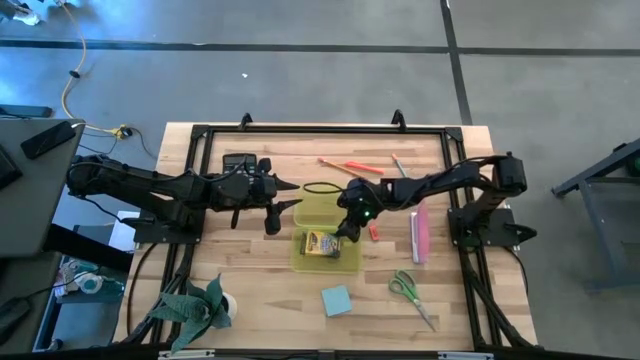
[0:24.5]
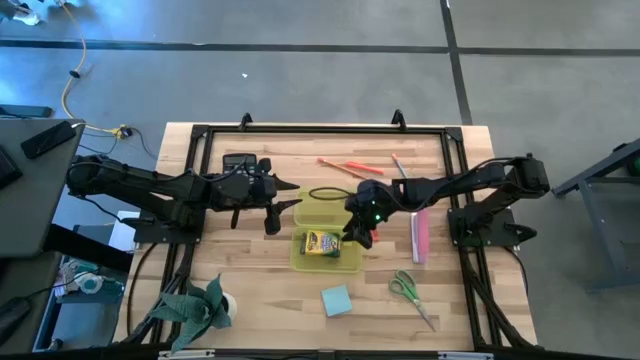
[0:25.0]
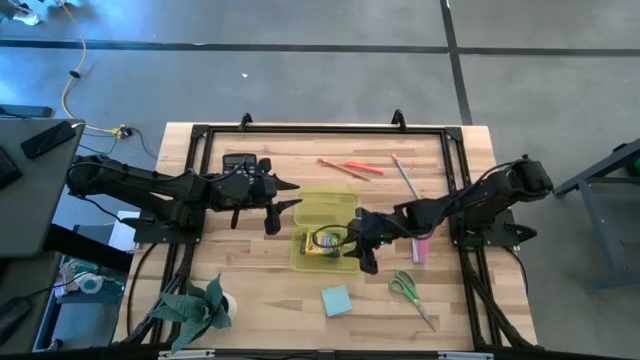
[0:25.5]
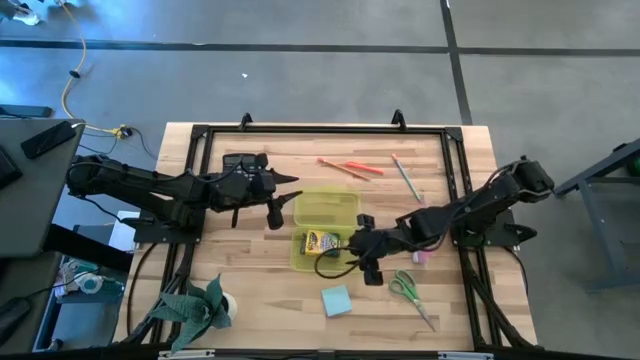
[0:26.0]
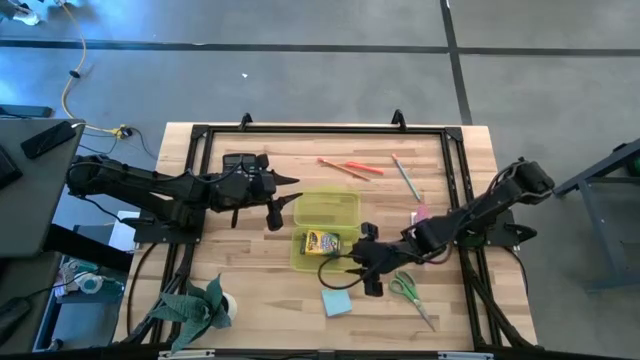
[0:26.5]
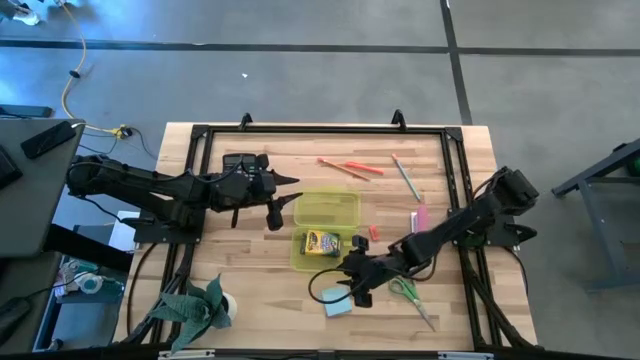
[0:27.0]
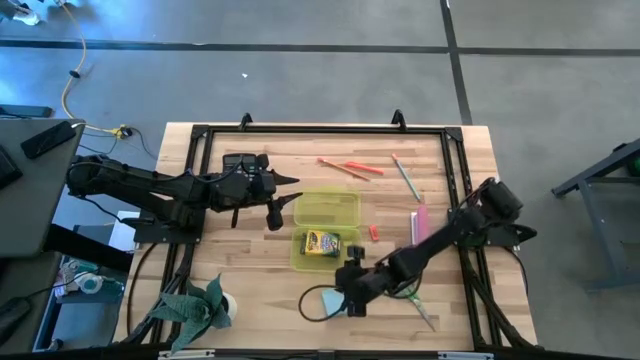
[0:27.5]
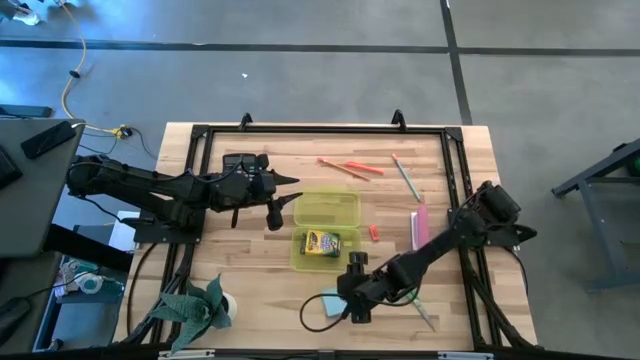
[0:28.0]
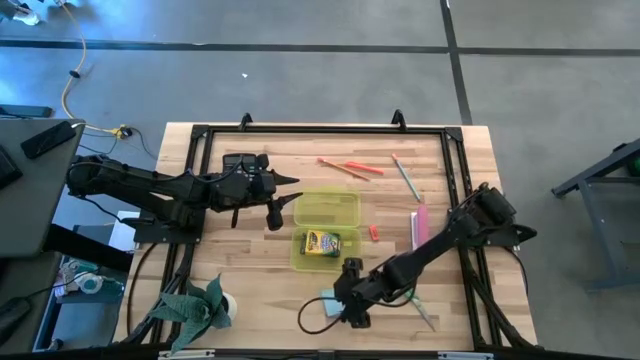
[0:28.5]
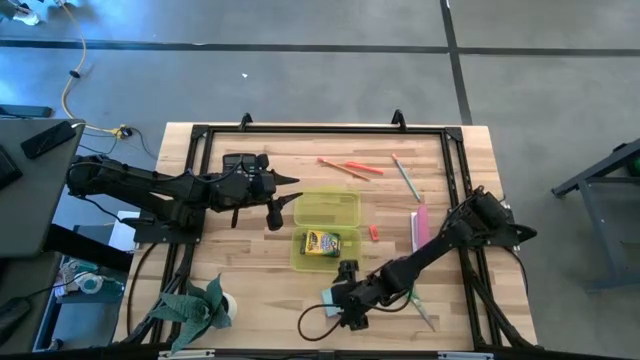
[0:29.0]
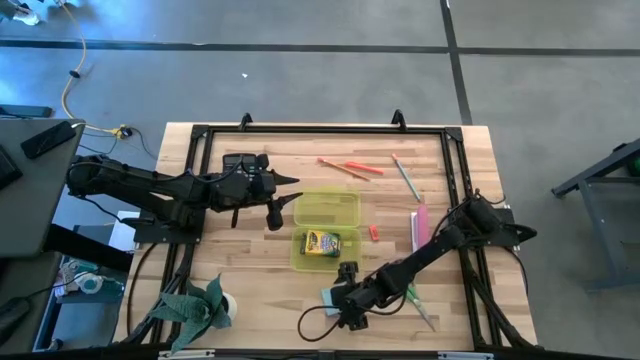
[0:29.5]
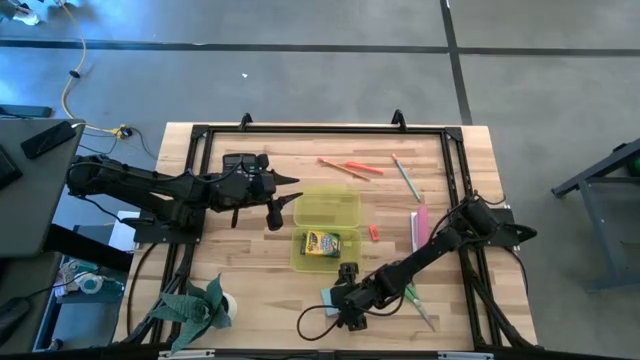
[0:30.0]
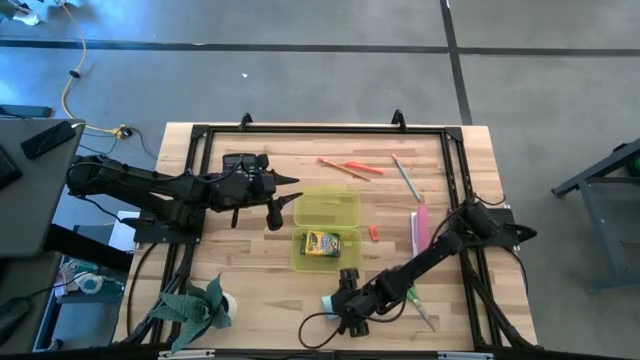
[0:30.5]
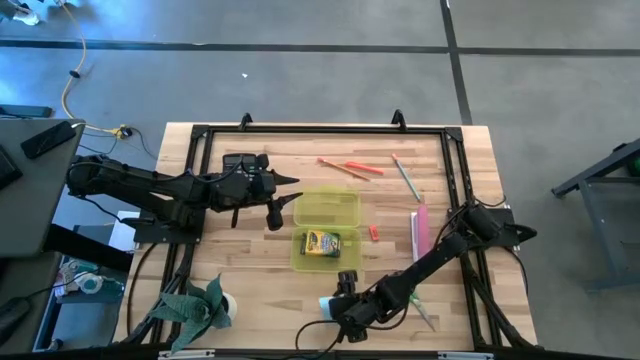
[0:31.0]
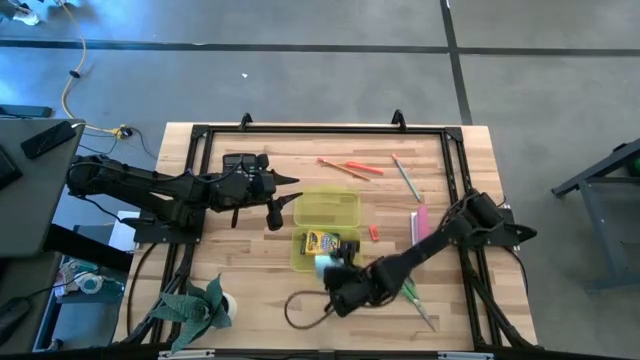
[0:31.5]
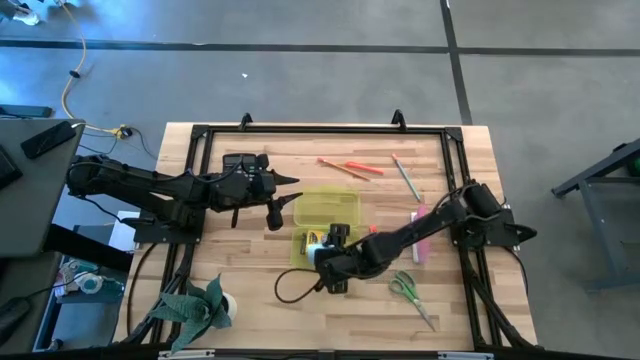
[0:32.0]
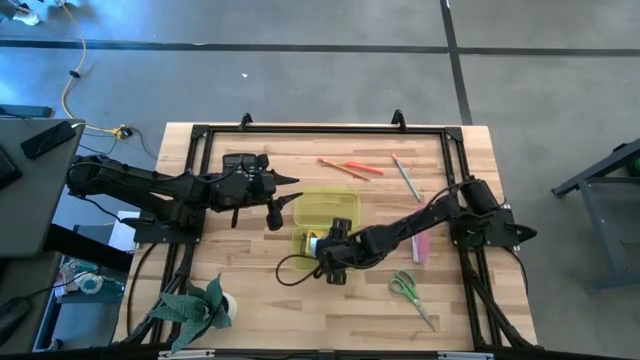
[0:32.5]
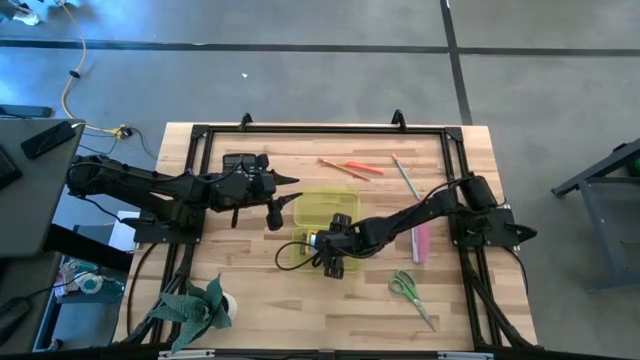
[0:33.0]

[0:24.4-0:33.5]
Task: Pack school essentials
Put the blue sticky notes into the yellow supply box

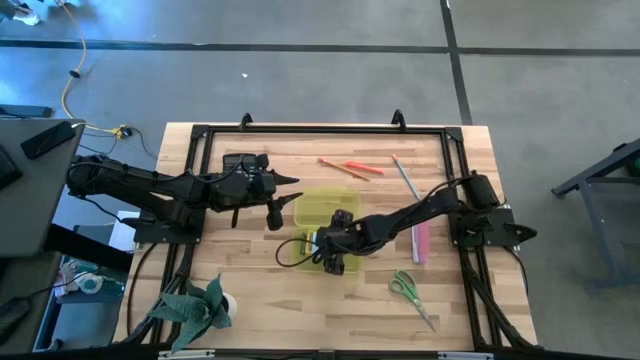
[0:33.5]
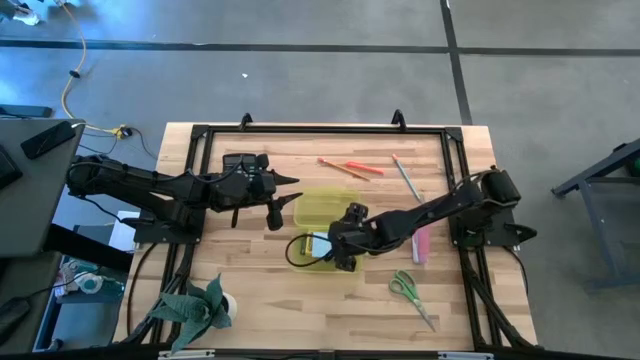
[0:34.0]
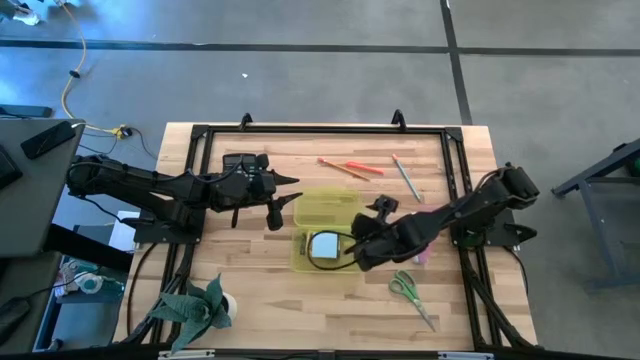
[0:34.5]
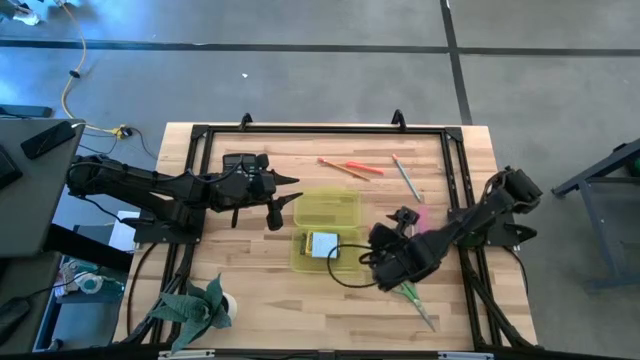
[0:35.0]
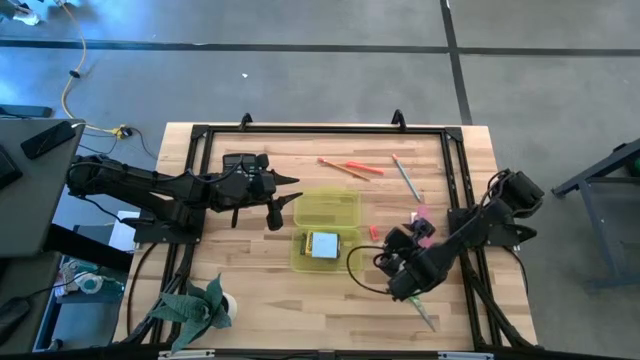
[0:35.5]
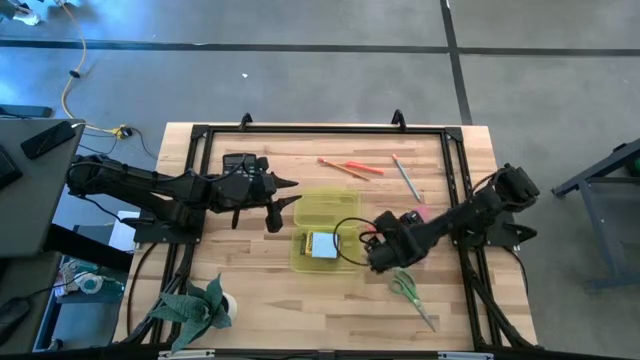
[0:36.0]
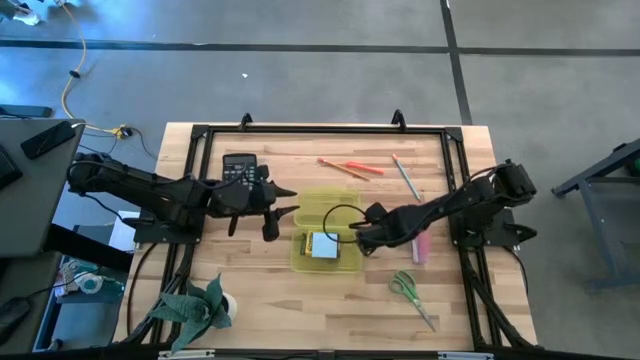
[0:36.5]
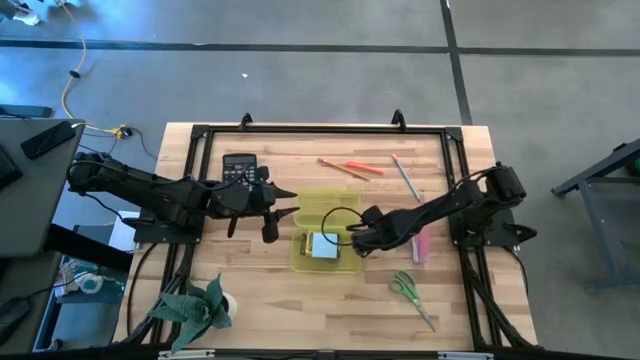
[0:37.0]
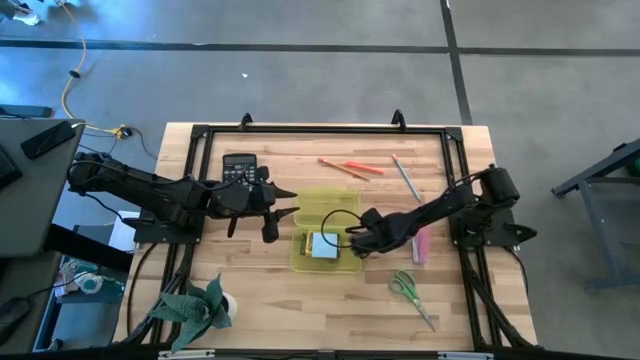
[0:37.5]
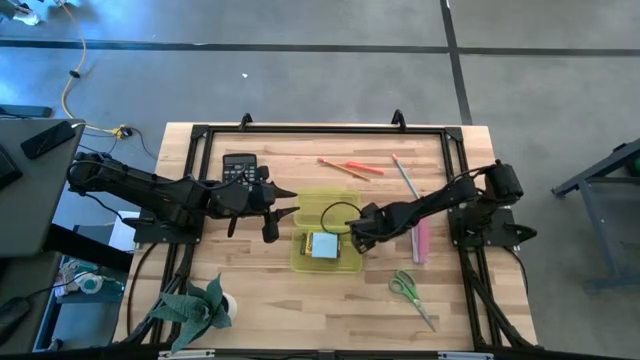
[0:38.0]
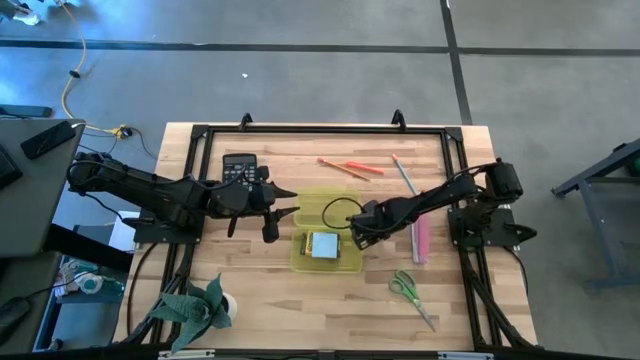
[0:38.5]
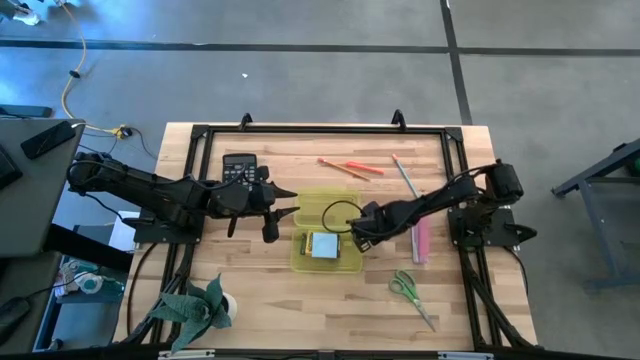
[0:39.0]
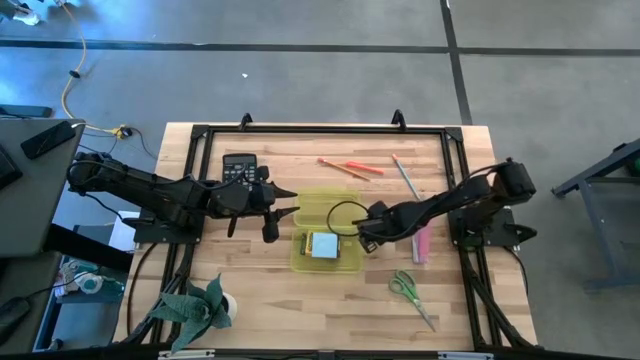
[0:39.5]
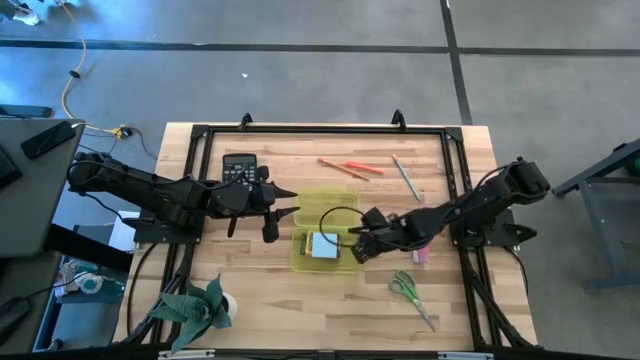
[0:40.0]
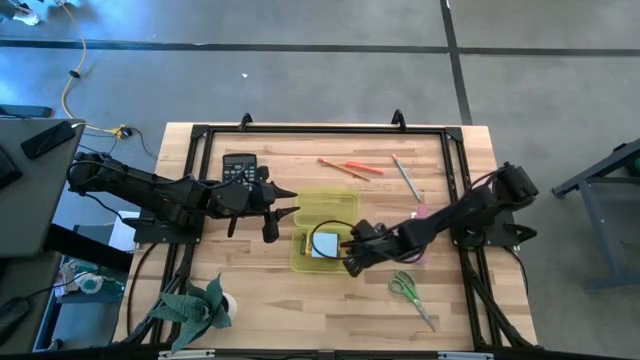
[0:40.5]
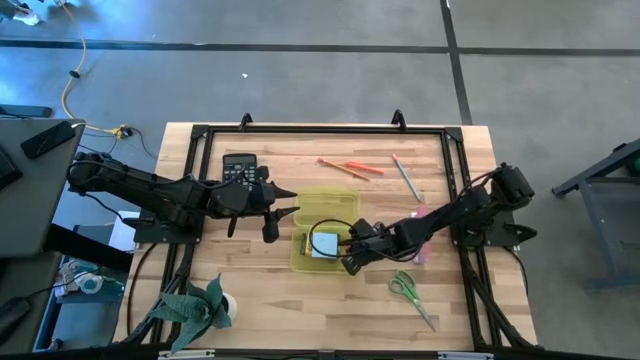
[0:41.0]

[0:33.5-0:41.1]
Put the orange eraser into the yellow supply box

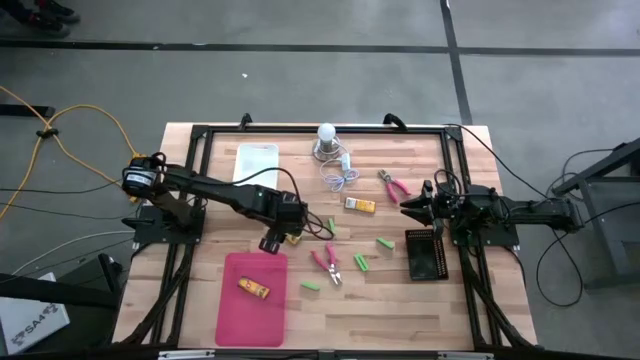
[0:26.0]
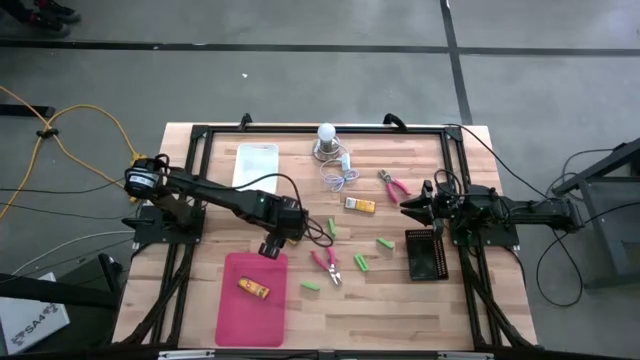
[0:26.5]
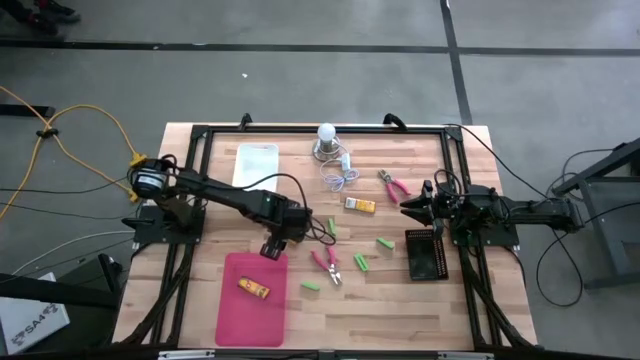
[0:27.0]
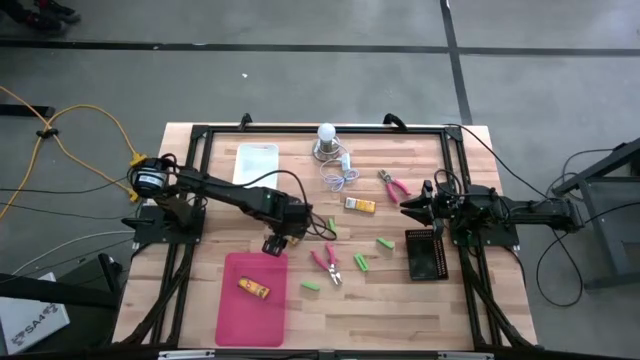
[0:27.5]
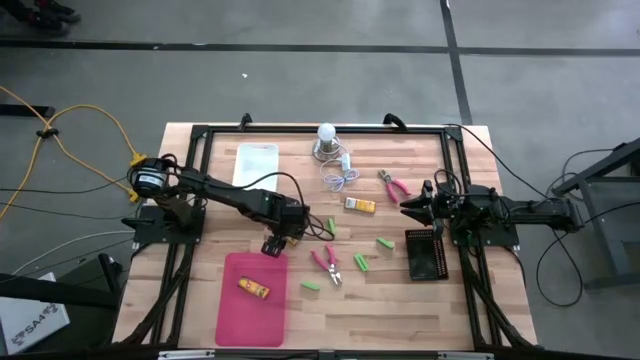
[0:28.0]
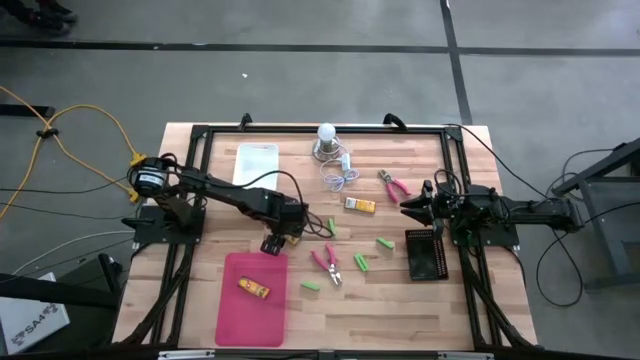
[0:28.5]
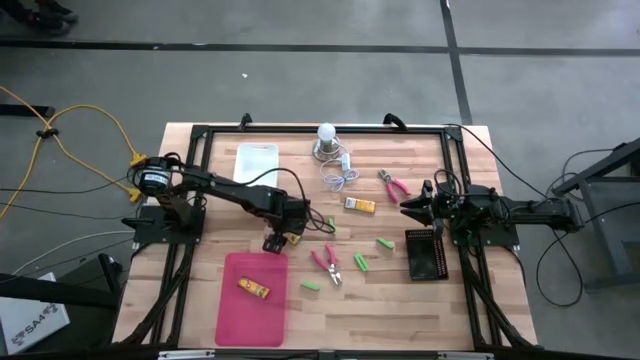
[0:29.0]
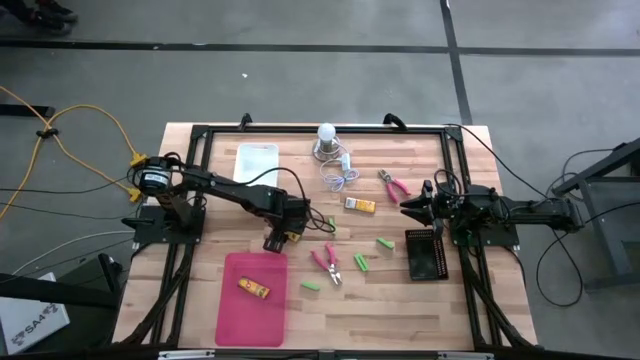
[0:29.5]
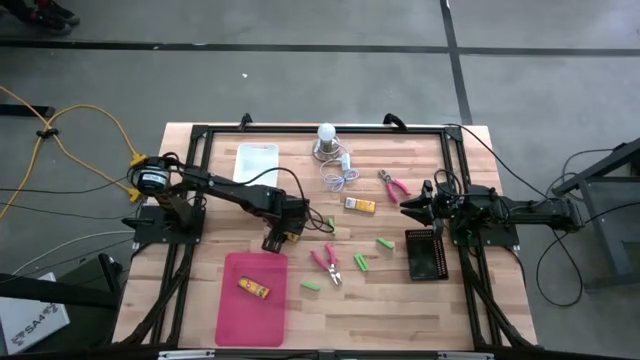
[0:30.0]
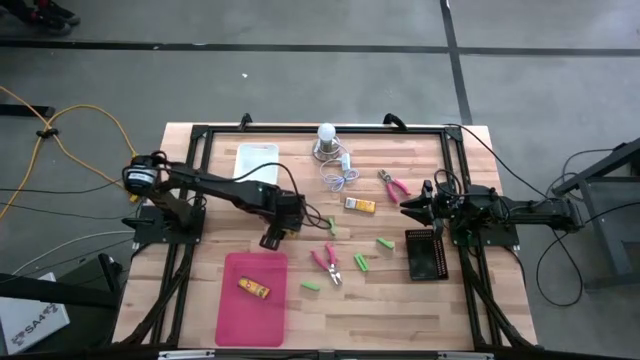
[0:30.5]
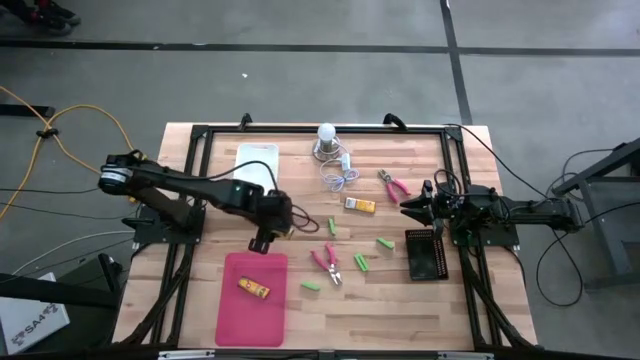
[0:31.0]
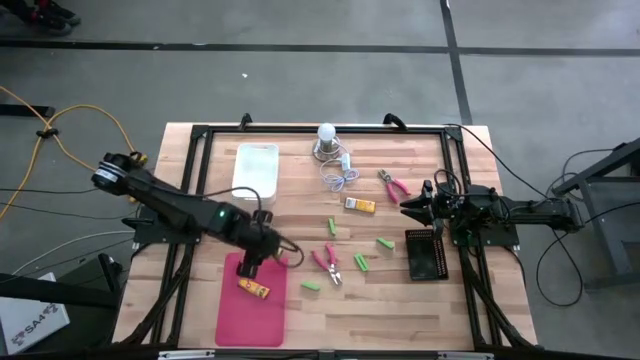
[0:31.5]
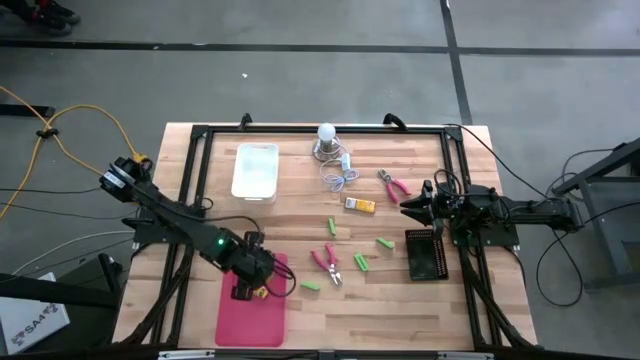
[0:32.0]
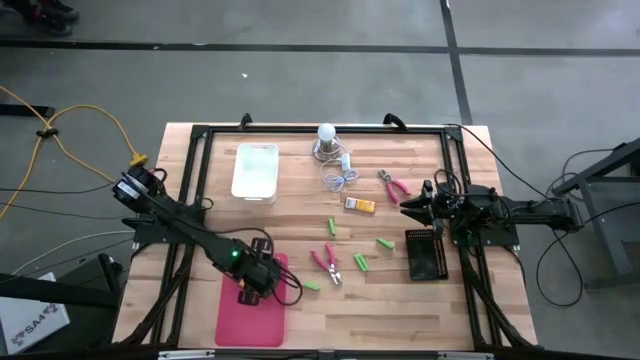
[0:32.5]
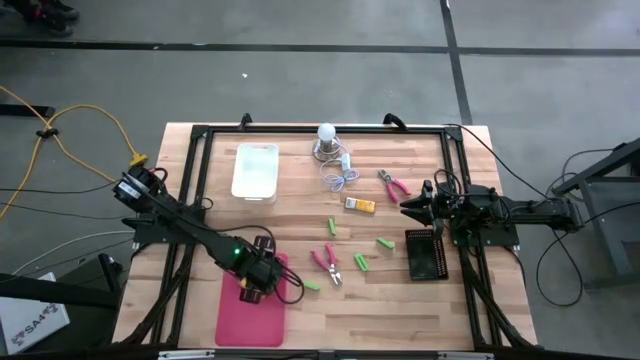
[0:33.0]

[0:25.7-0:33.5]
Task: Pick & Place School Supplies
Put the bottom crayon box into the pink bin
